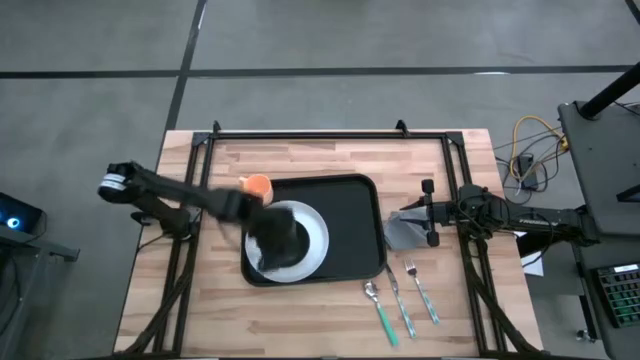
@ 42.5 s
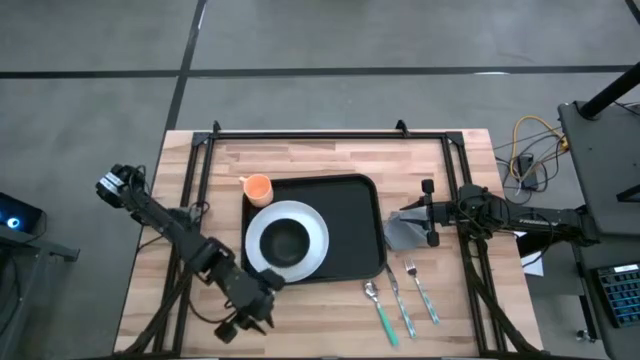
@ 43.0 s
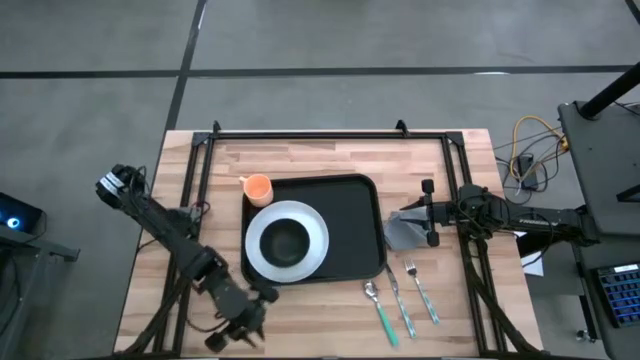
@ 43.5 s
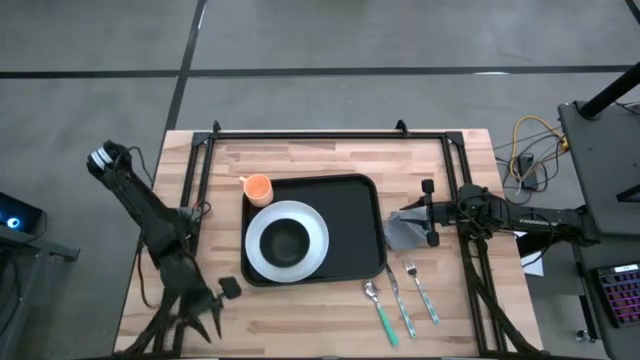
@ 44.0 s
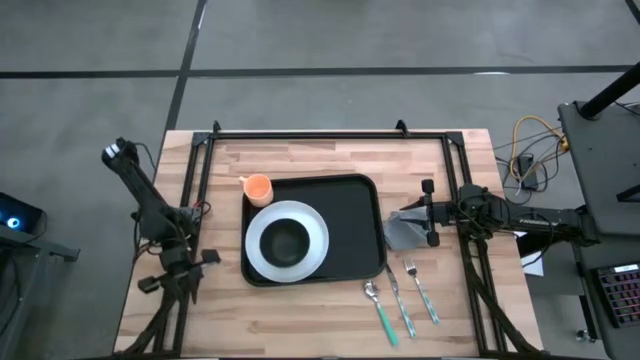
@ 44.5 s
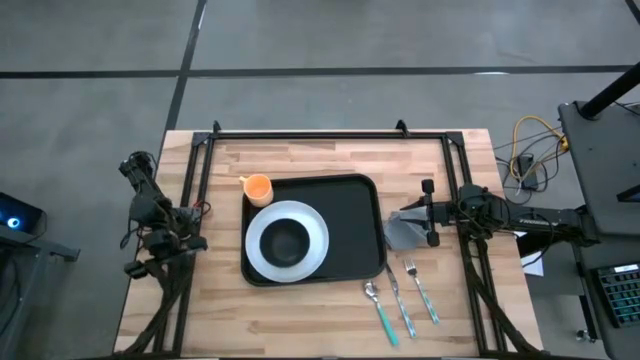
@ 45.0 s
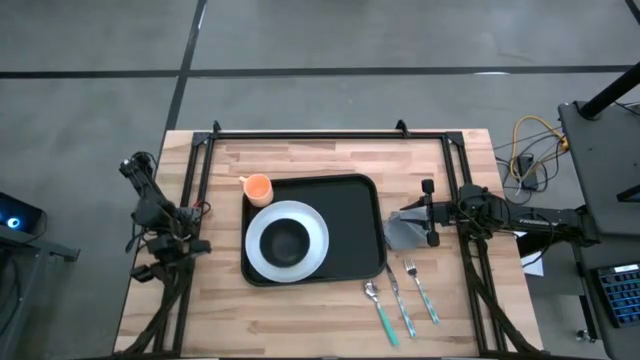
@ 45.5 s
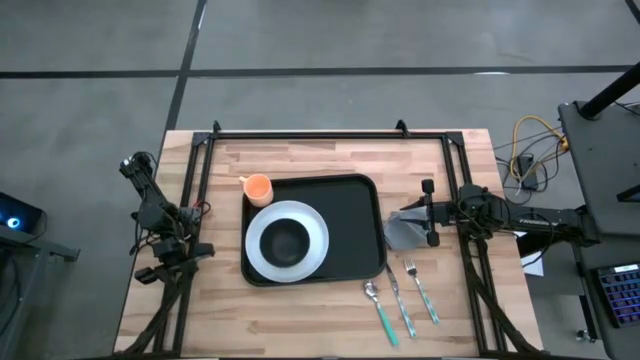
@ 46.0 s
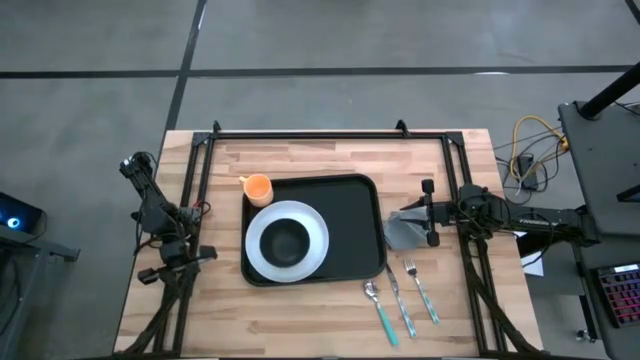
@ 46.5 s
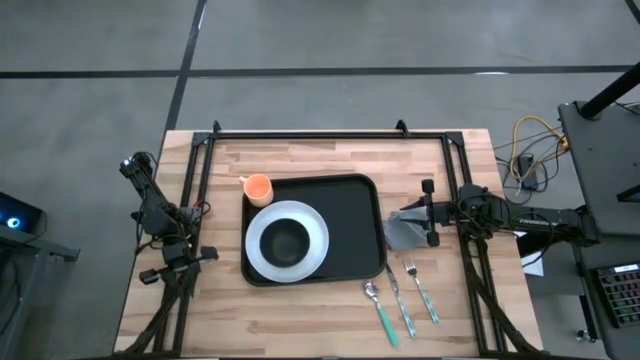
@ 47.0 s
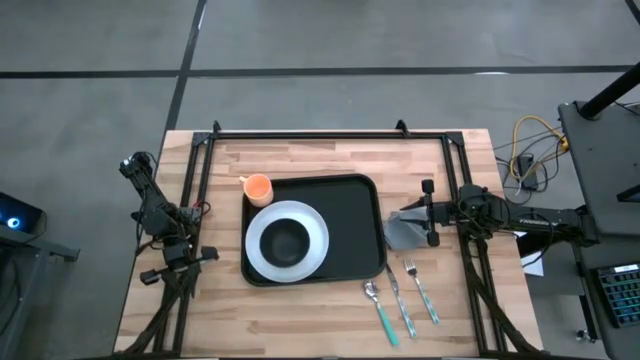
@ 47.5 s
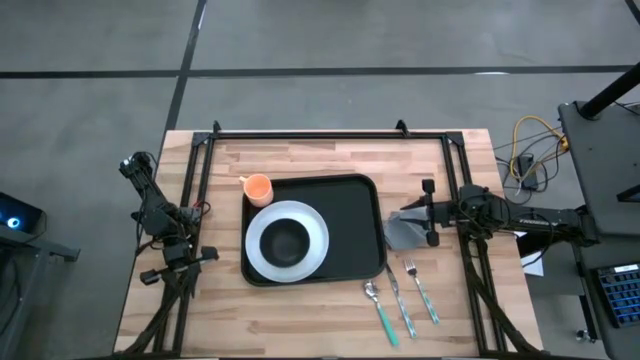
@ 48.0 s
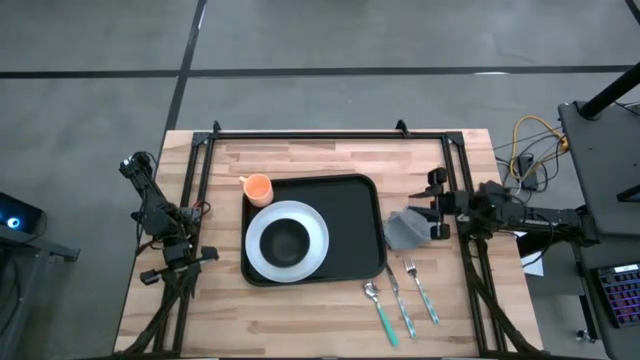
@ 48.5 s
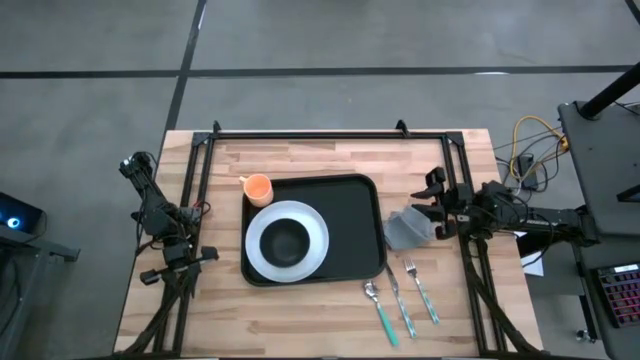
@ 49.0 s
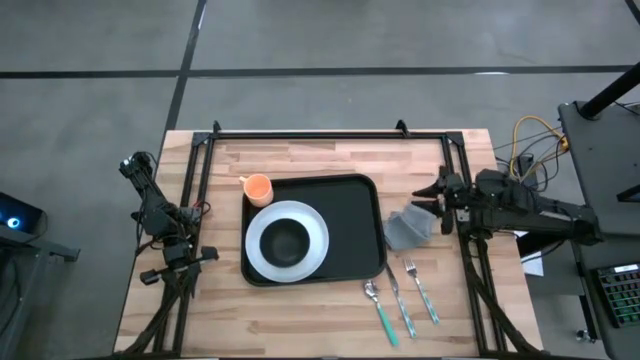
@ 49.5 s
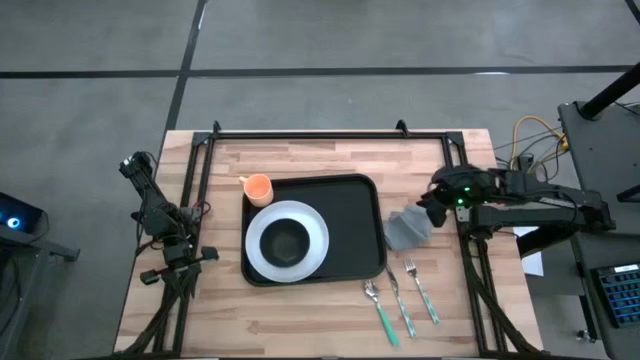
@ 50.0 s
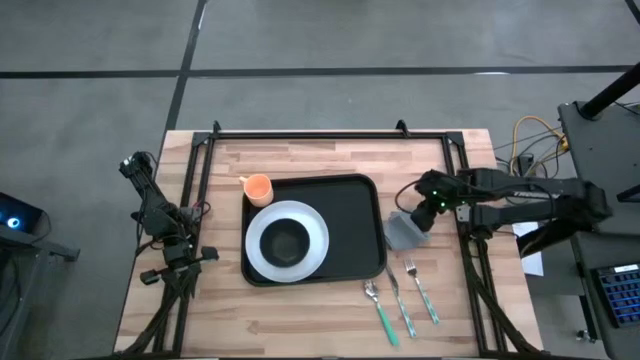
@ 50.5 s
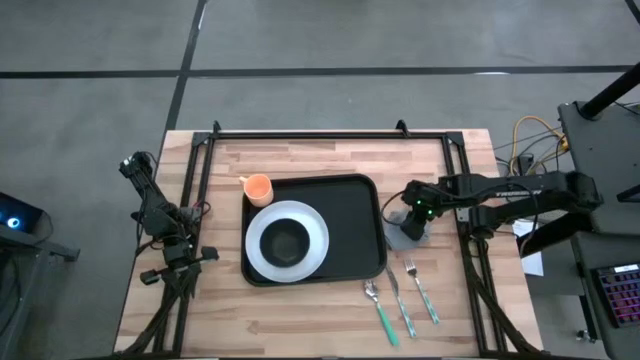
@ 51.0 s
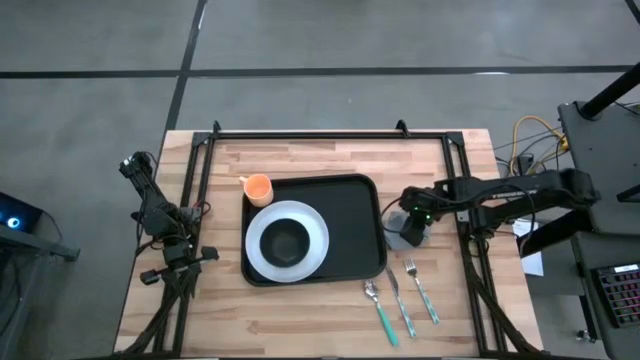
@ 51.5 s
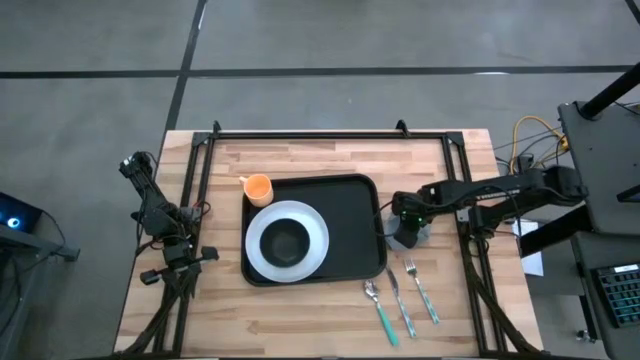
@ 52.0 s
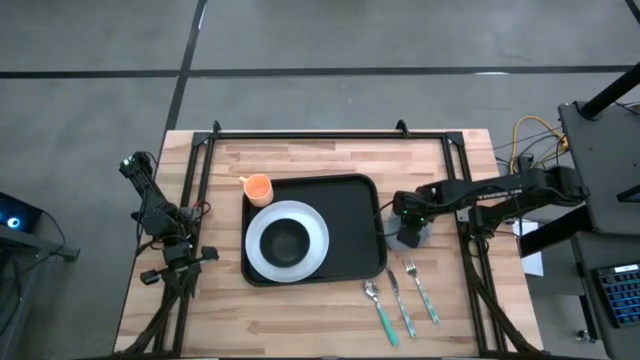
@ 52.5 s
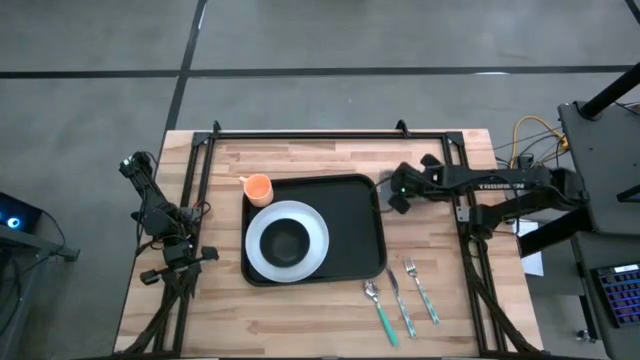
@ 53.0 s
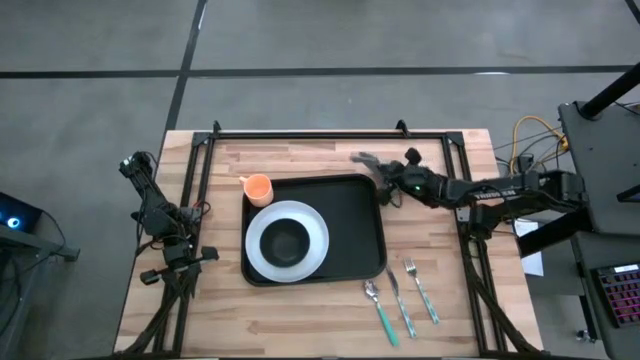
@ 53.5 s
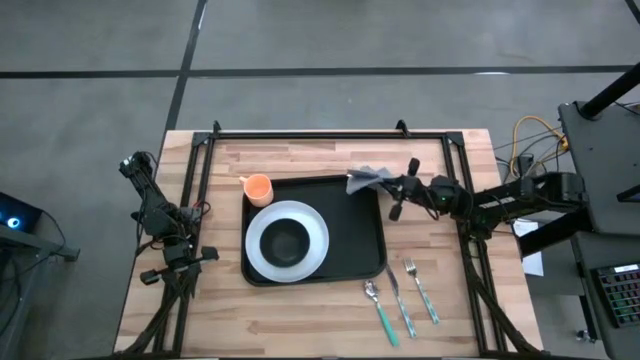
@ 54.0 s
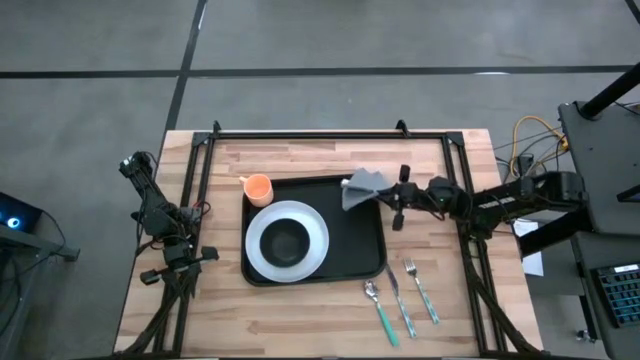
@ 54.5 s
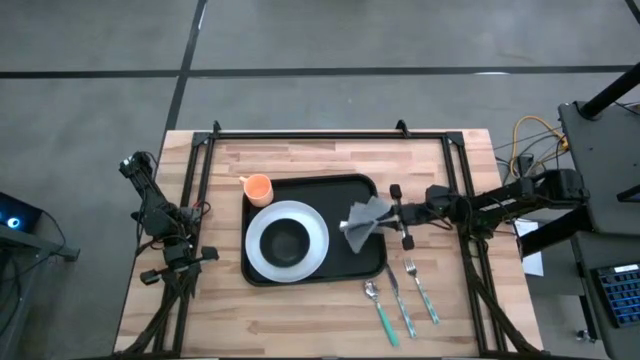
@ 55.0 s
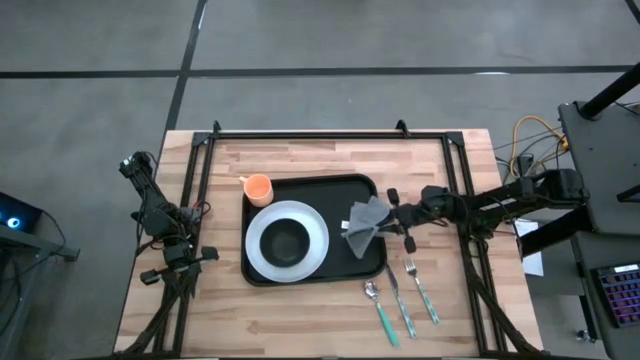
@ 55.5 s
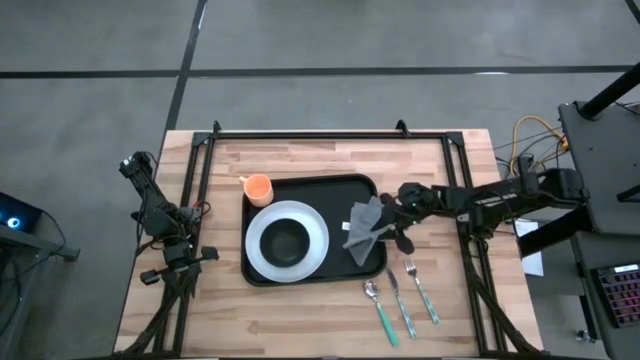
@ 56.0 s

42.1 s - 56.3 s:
Task: Set up tray
Put the gray table napkin on the black tray to the right of the white plate

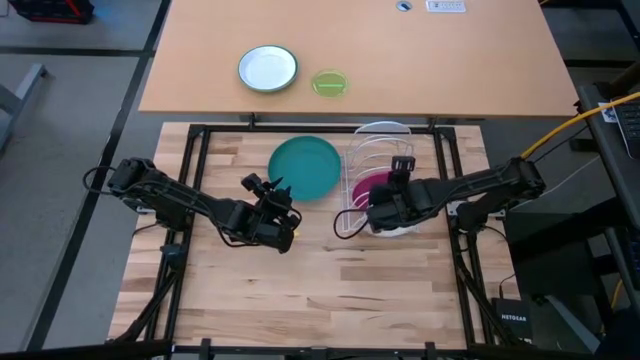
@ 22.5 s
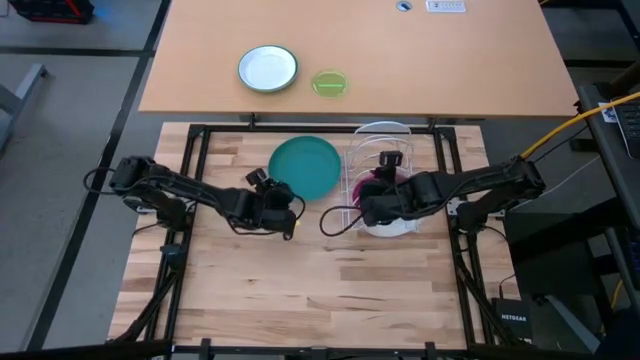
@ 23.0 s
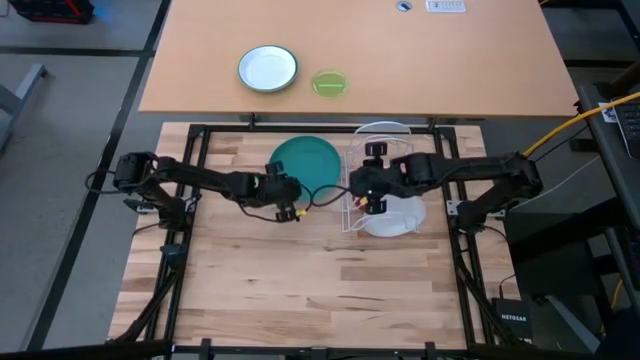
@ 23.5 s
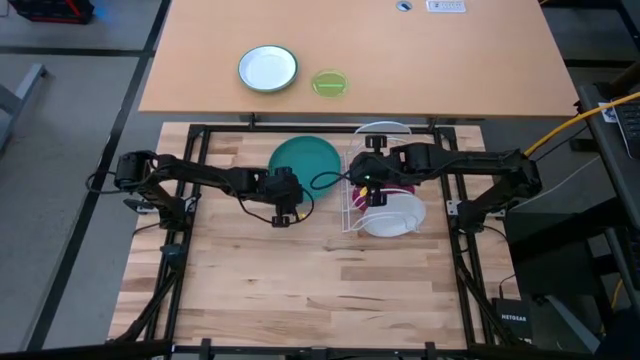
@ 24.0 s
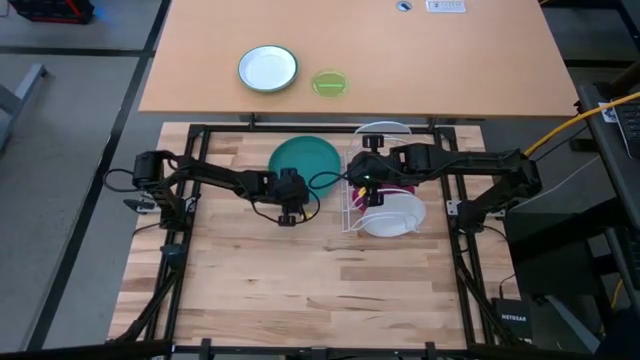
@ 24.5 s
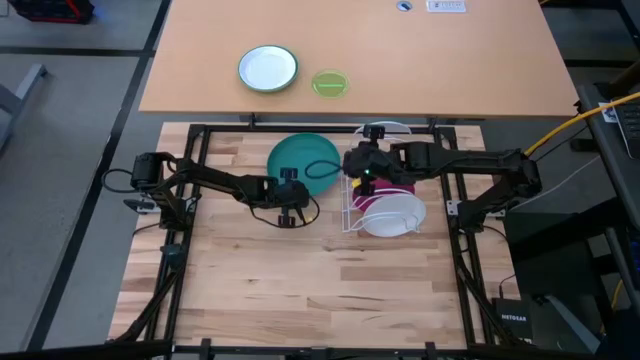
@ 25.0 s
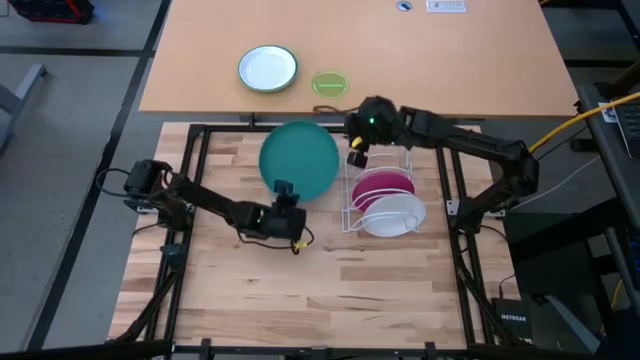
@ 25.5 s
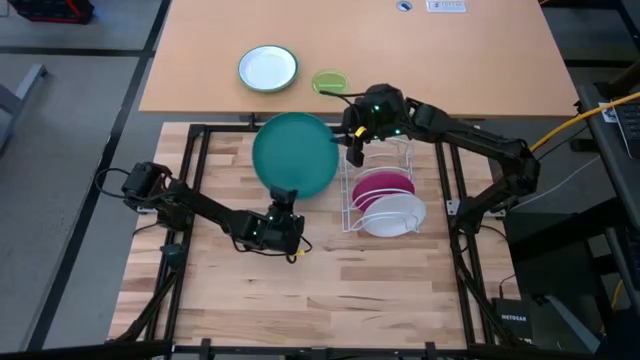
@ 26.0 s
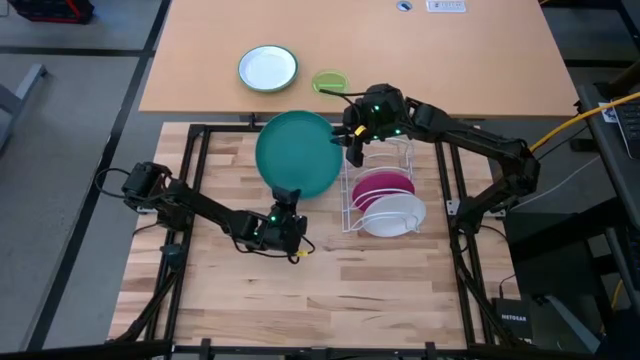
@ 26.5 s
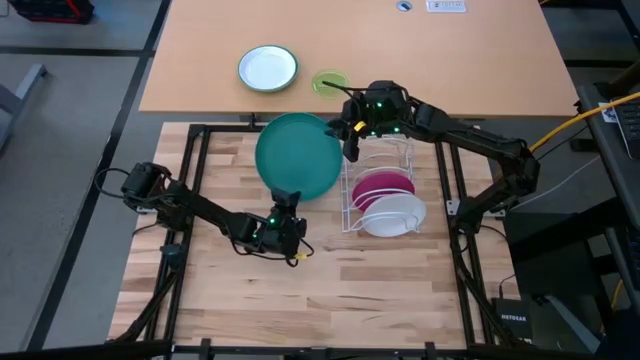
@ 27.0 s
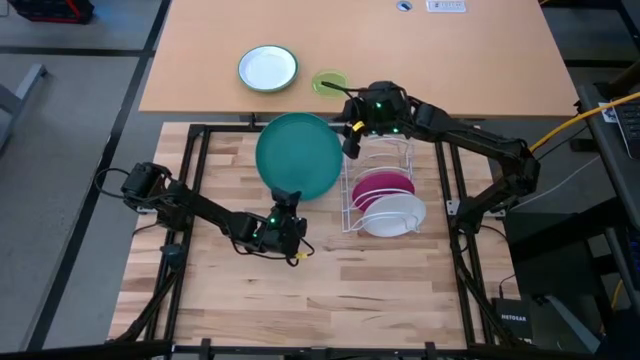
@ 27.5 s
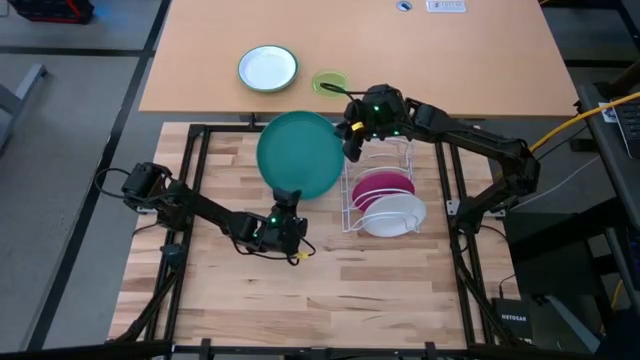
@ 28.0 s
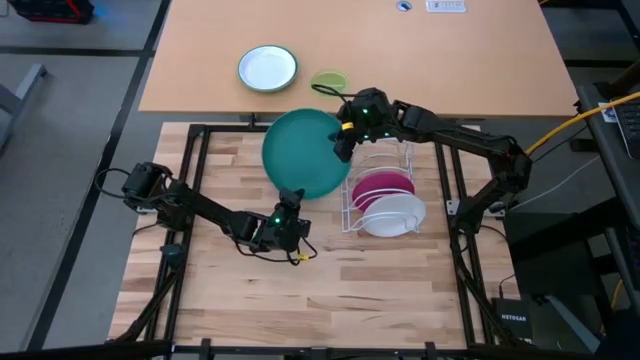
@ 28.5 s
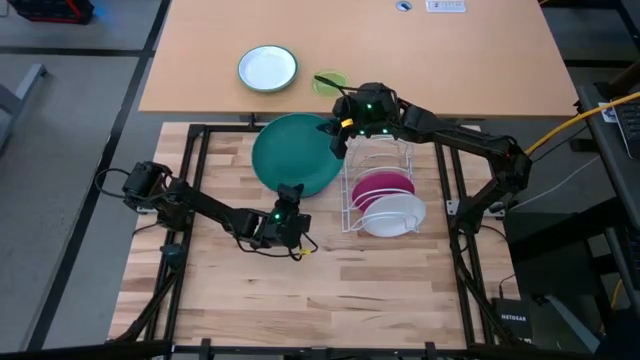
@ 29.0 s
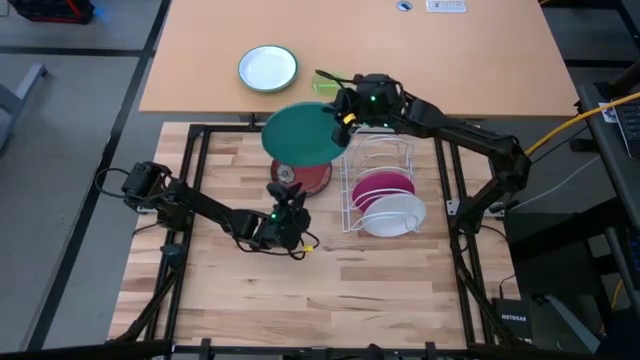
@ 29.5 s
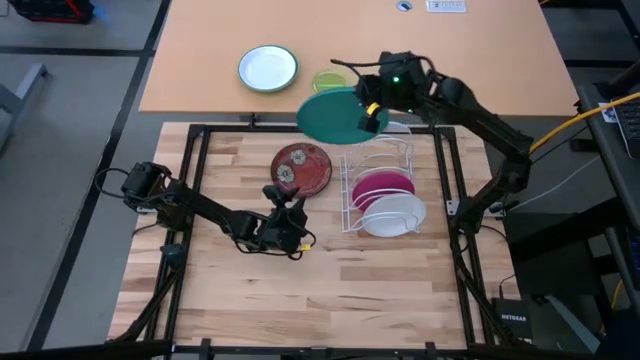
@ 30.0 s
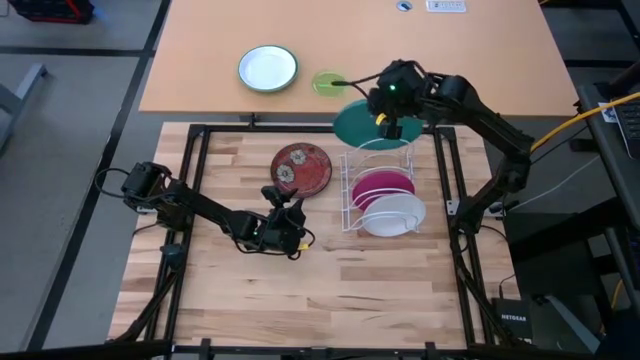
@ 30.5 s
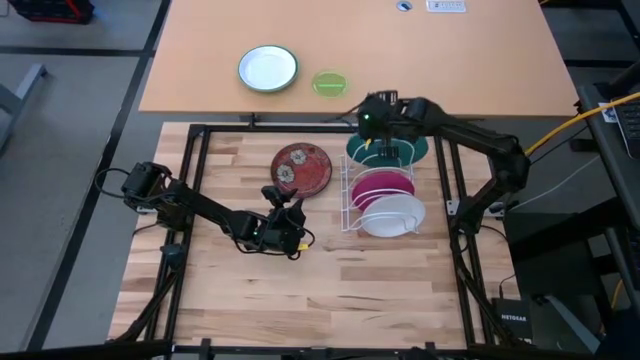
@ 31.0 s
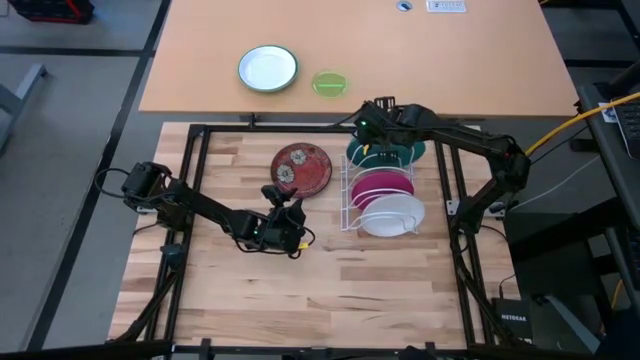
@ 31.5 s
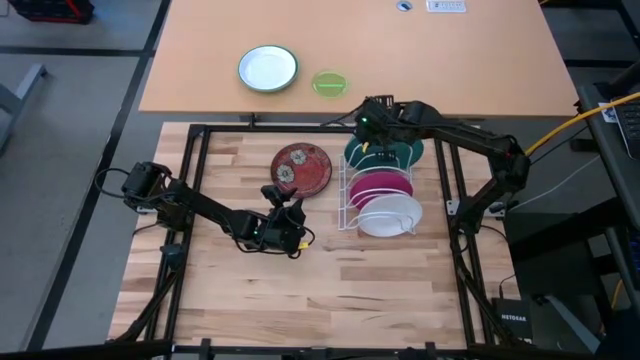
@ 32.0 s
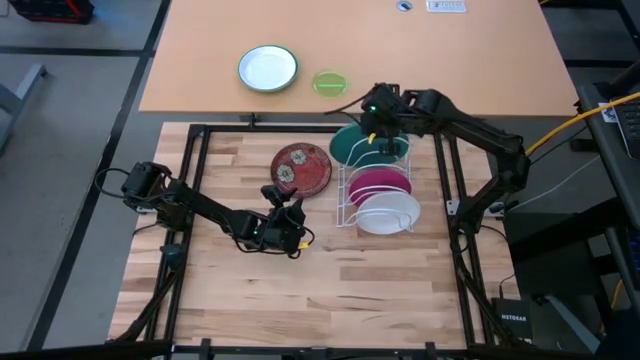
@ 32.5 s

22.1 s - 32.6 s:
Task: Sort dishes
Put the dark blue plate in the dish rack
